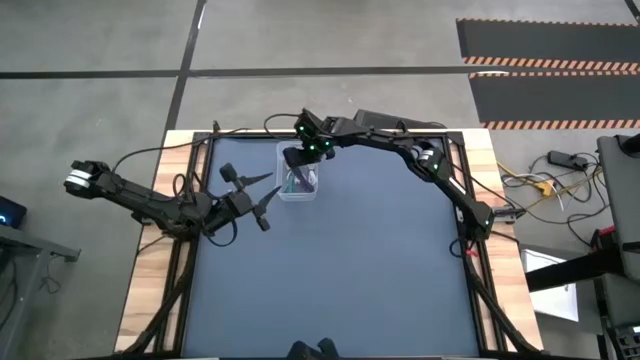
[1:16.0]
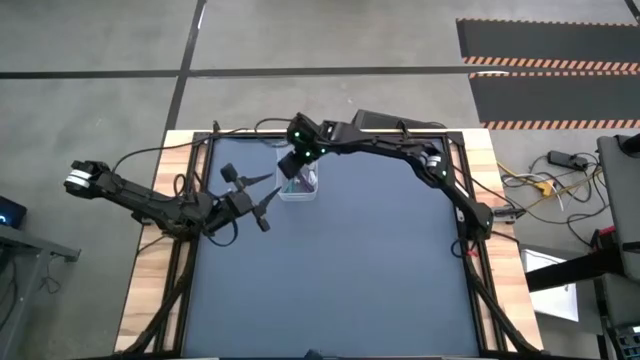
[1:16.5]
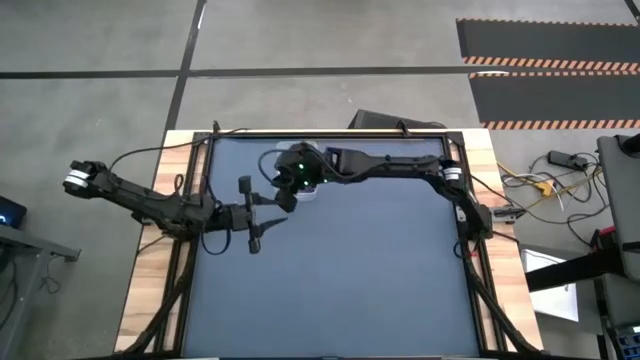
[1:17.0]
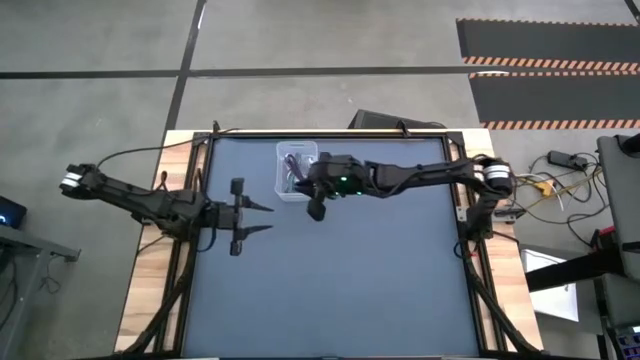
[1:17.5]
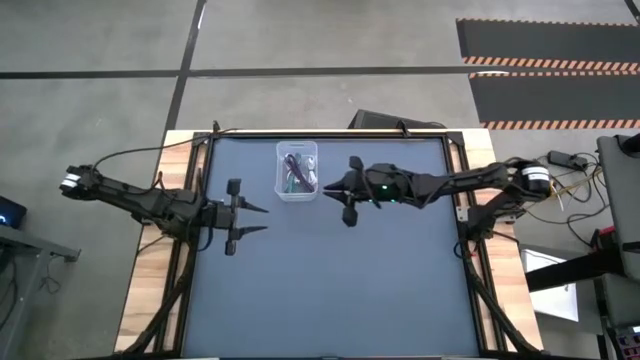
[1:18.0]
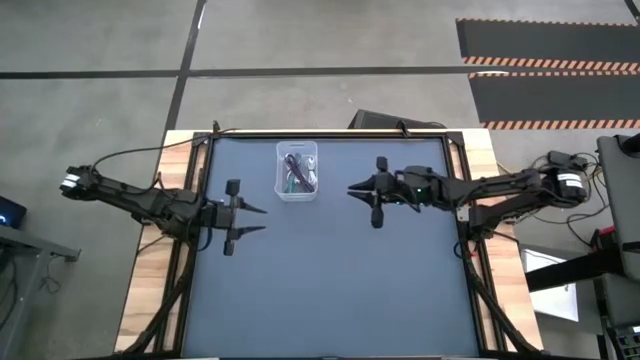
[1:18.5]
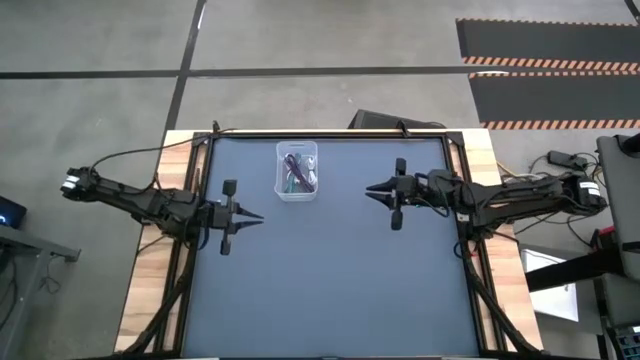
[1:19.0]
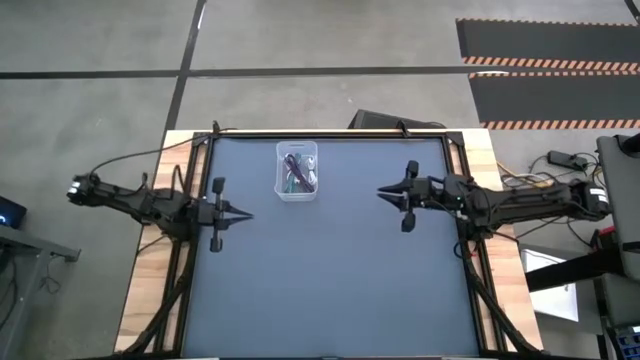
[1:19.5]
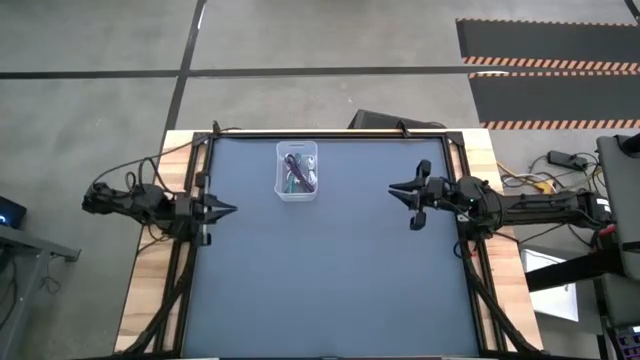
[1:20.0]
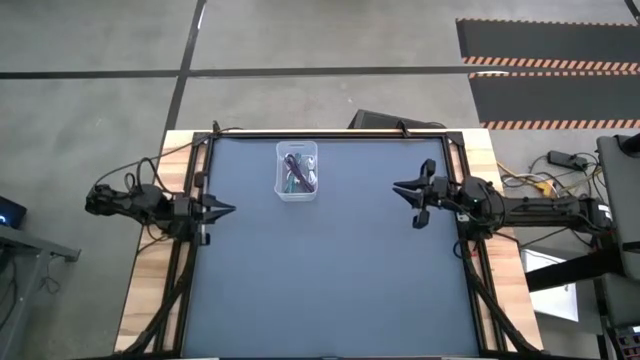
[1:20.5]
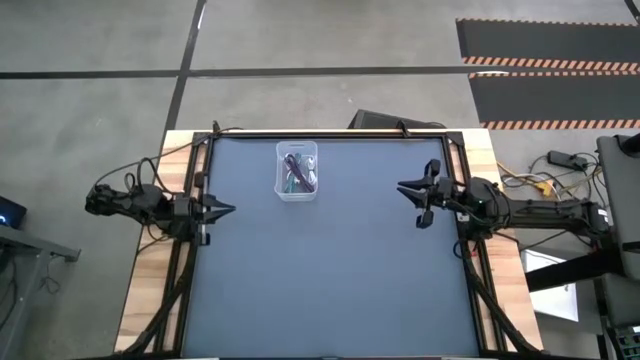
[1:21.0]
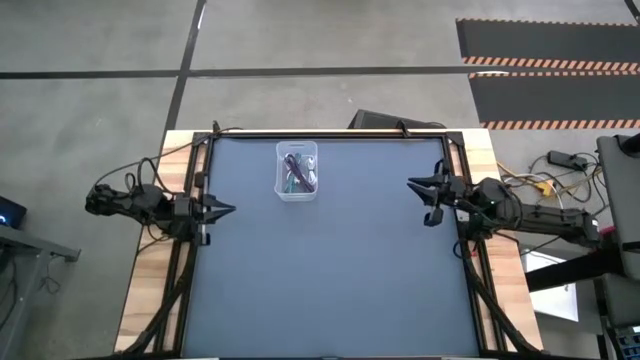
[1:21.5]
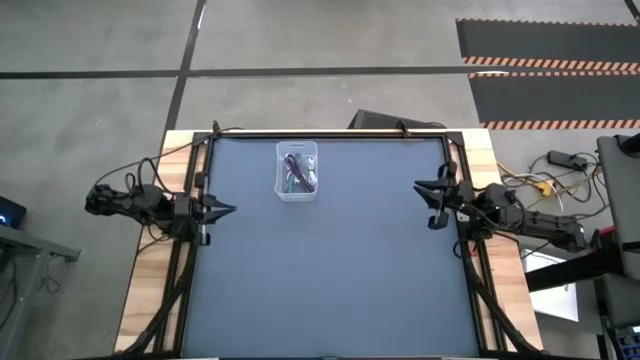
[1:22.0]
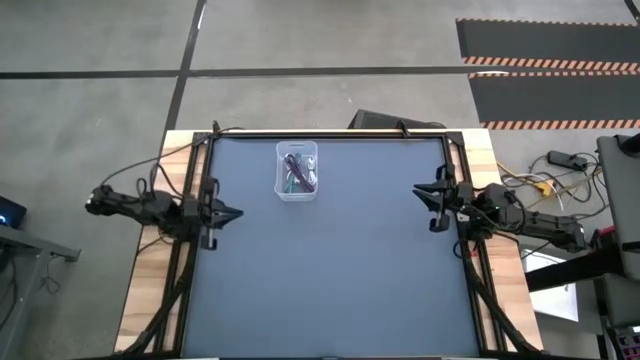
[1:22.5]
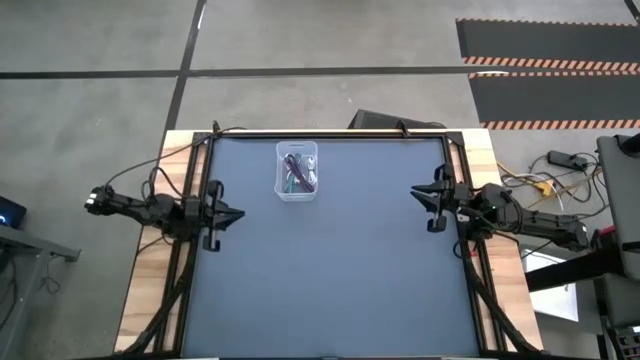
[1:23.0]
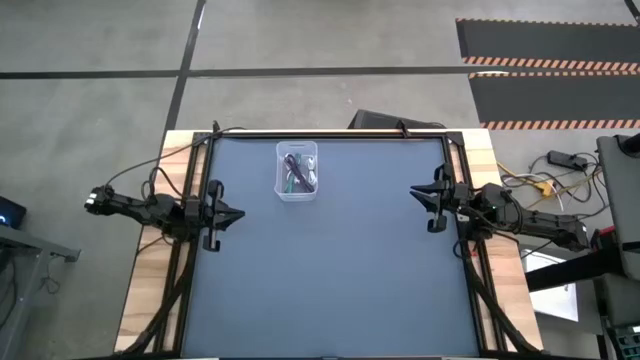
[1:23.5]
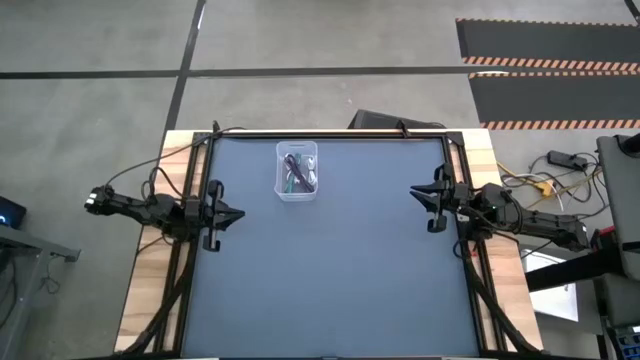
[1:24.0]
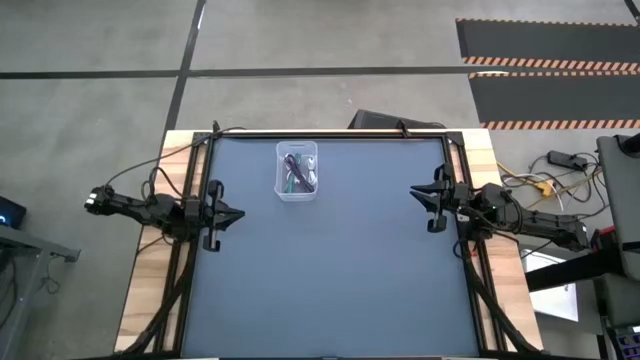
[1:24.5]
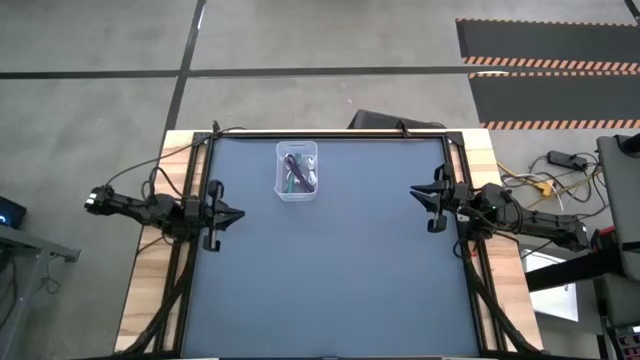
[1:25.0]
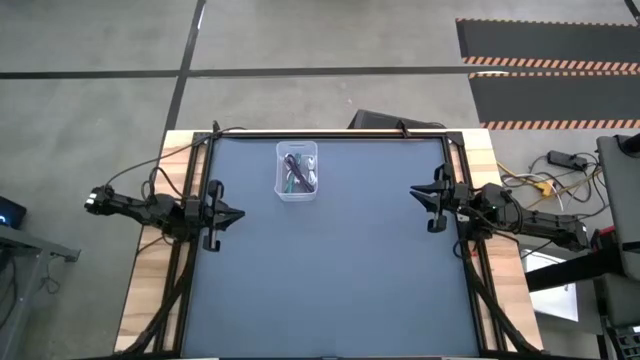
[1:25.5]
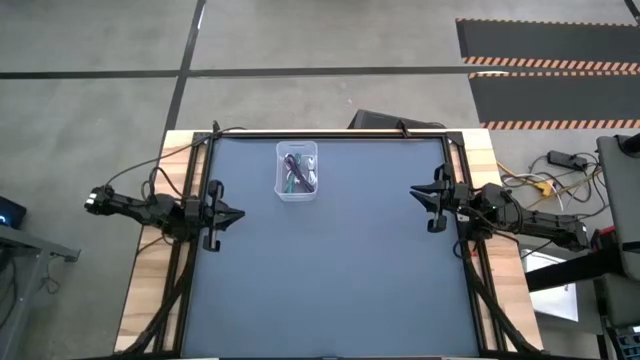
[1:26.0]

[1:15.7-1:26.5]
Task: Pick and place USB-C Cables
Return to Home Position

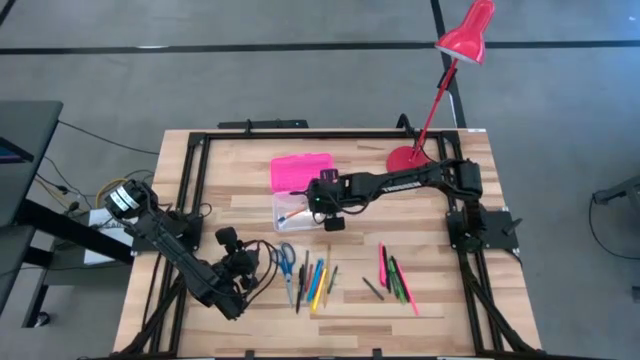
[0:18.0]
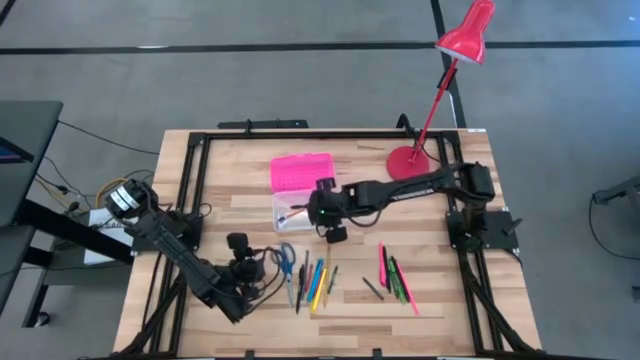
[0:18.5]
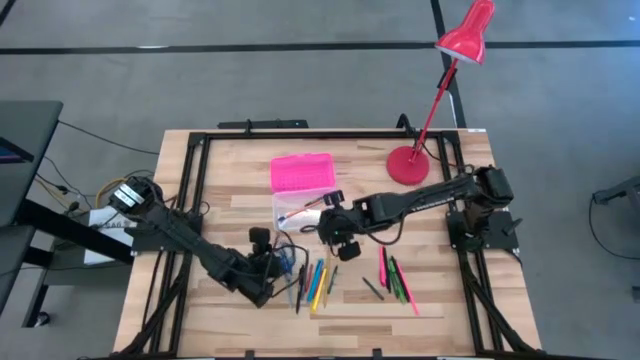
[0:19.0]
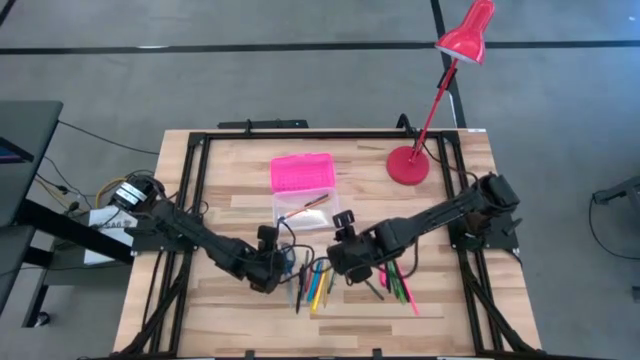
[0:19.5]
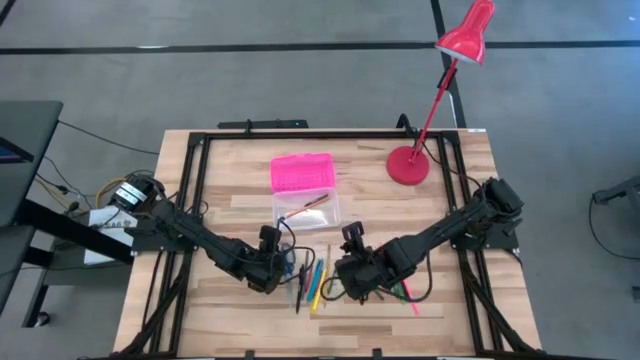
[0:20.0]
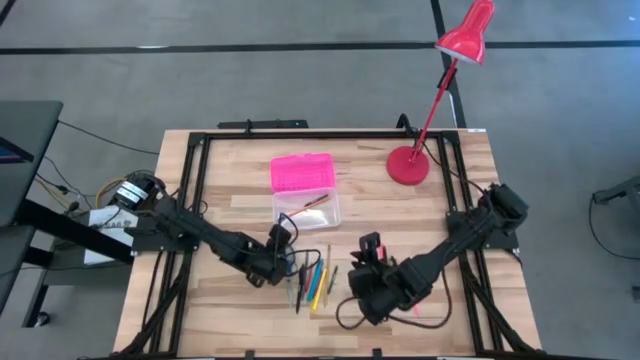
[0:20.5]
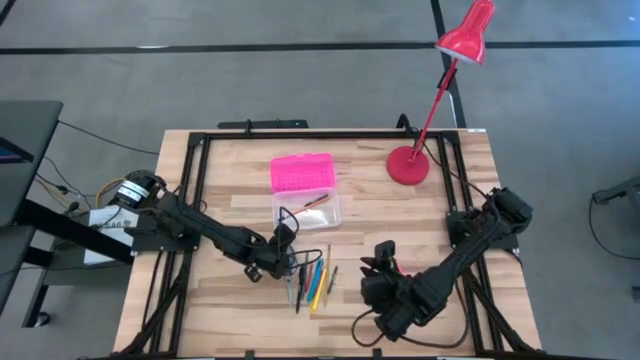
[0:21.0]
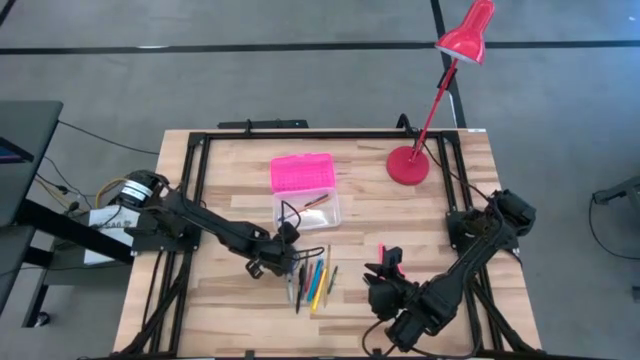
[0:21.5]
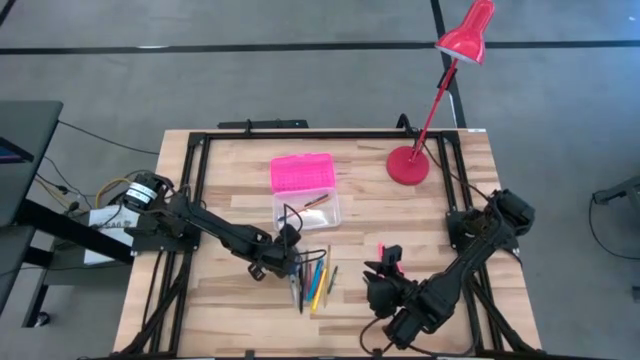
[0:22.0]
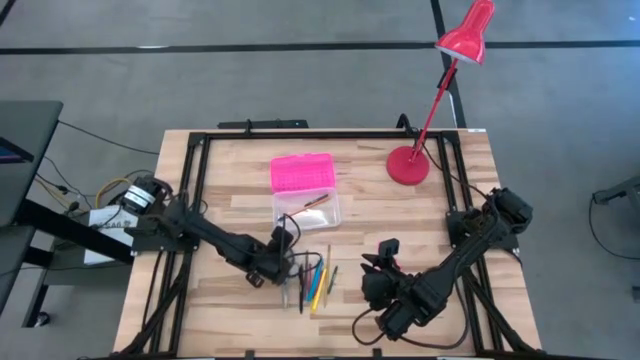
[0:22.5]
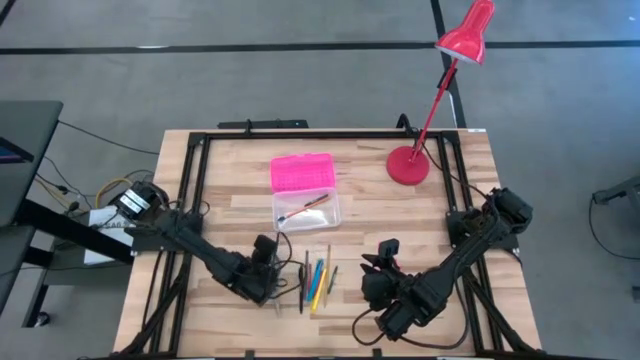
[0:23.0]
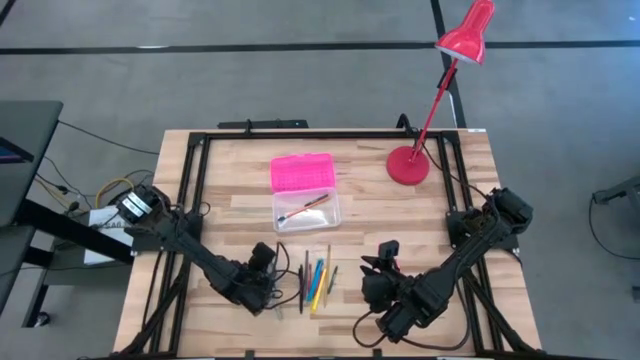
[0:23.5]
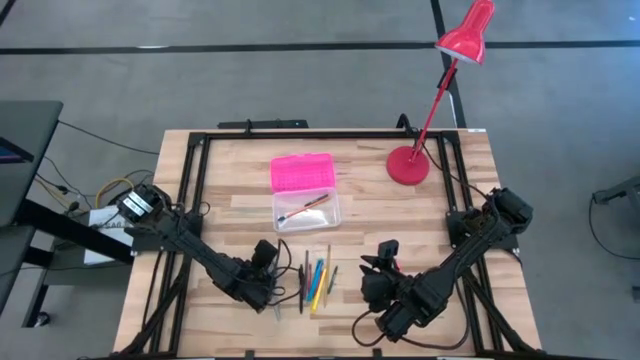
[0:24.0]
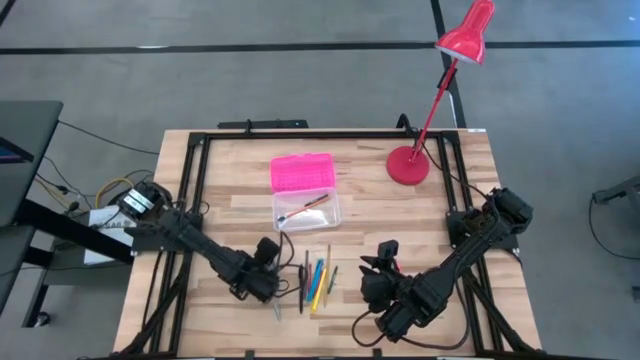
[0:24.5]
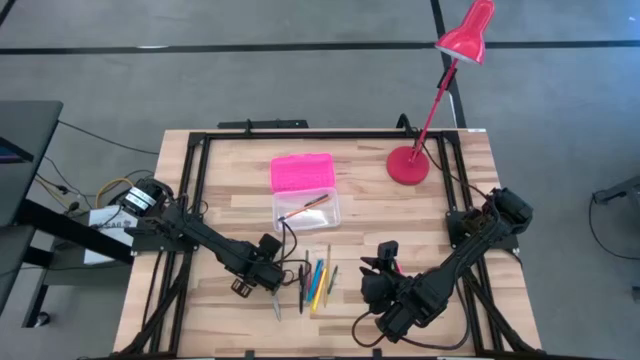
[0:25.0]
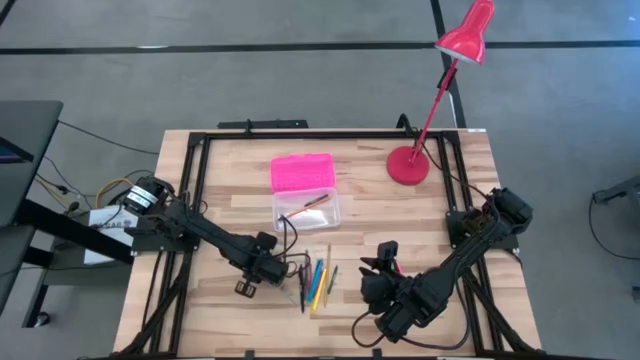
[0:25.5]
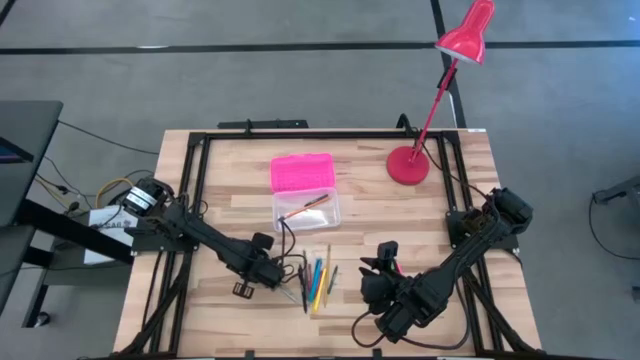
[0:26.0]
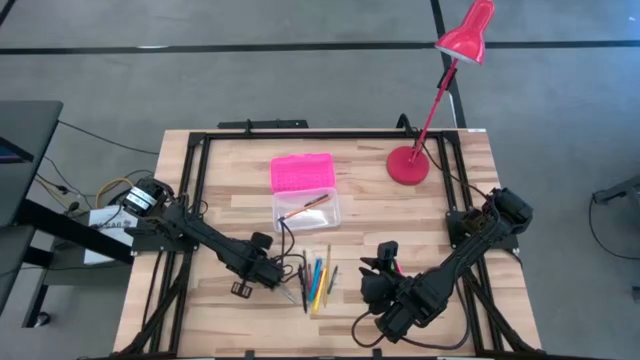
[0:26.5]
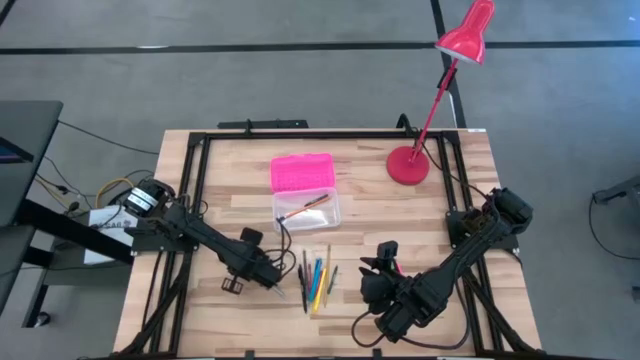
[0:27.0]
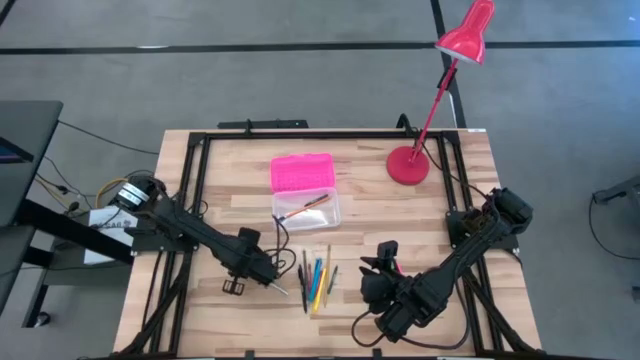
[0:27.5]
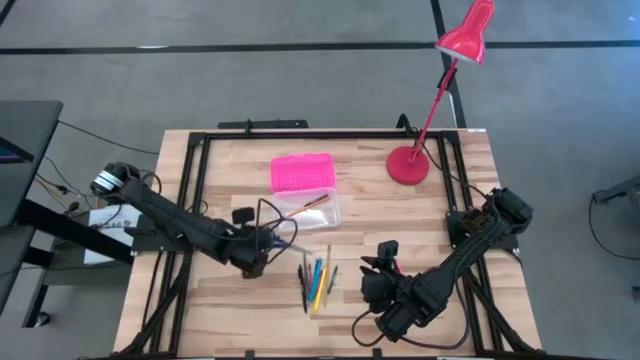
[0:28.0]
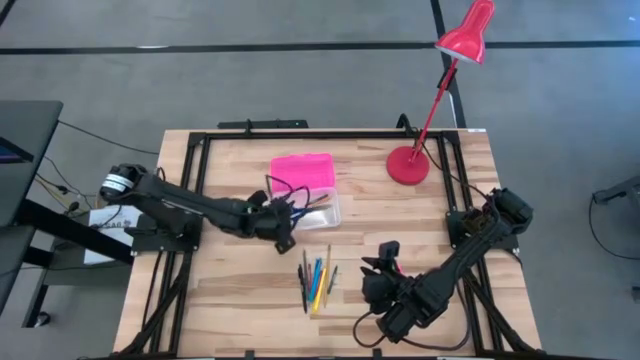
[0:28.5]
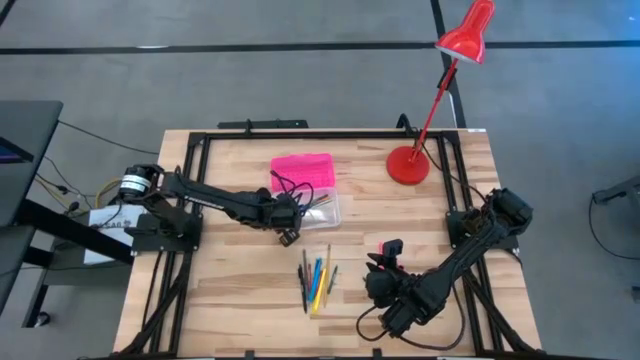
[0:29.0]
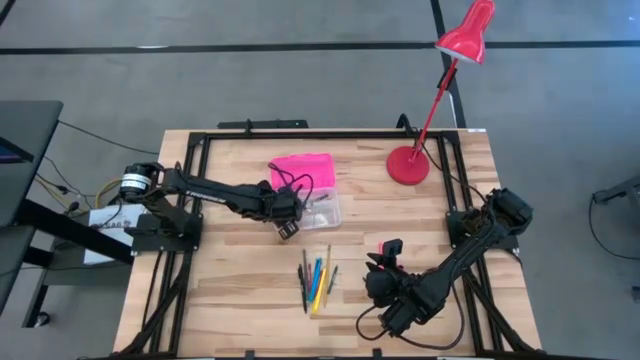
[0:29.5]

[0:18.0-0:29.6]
Task: Pick & place school supplies into a supply box
Put the blue scissors into the pink supply box
